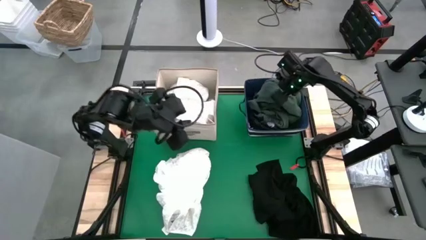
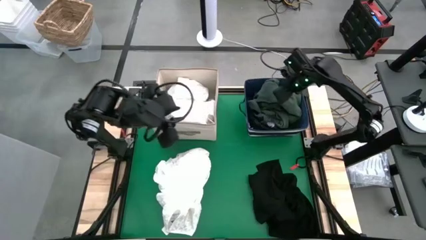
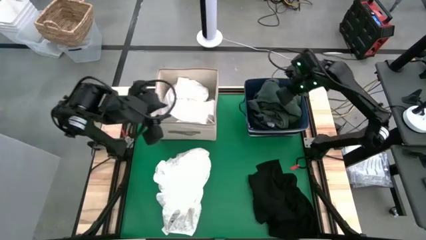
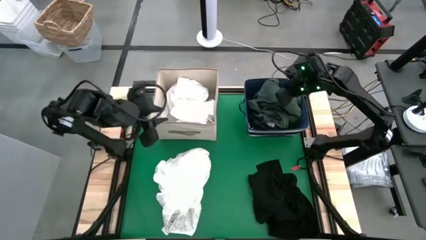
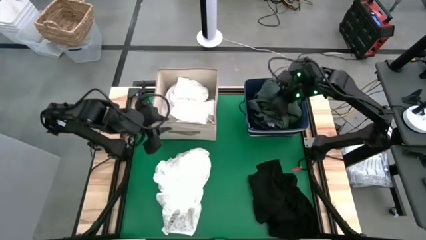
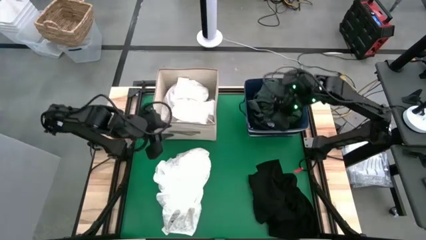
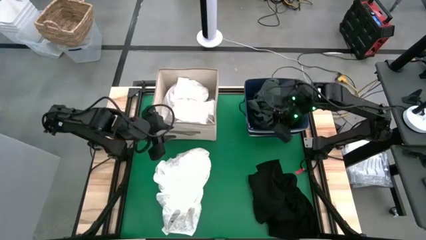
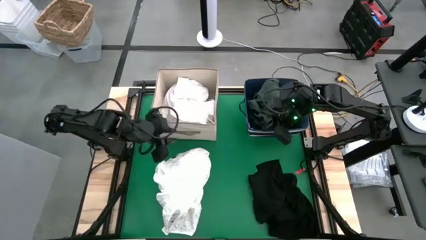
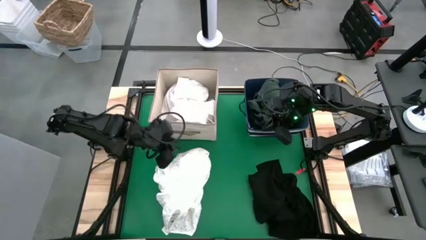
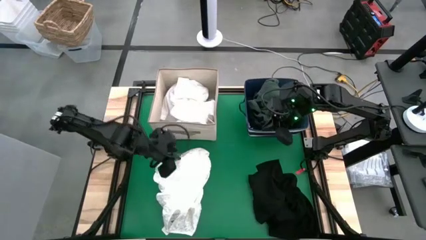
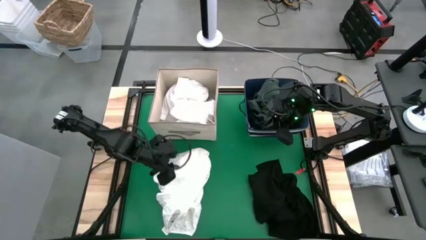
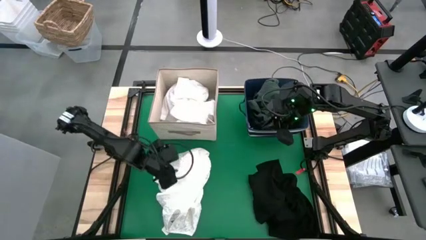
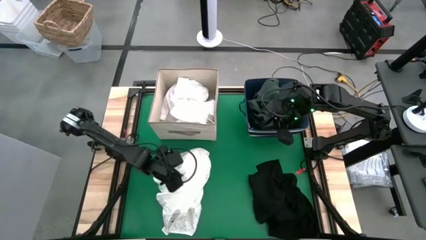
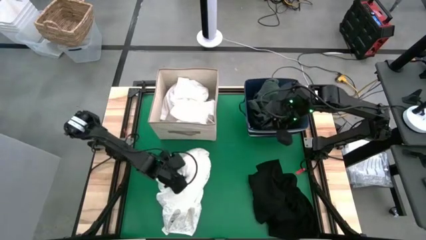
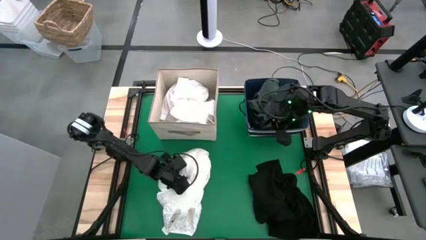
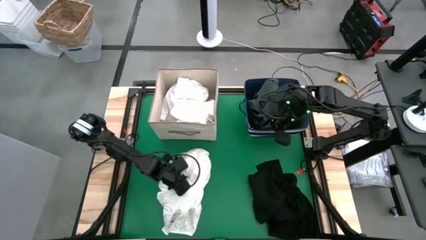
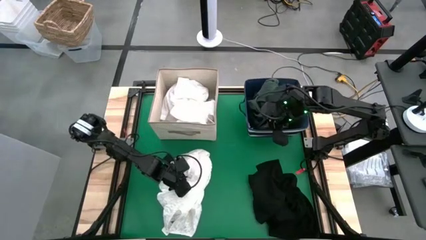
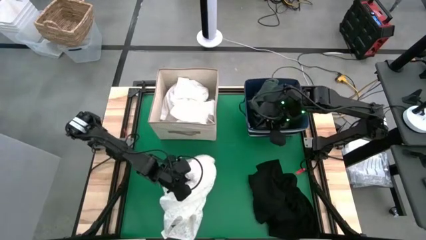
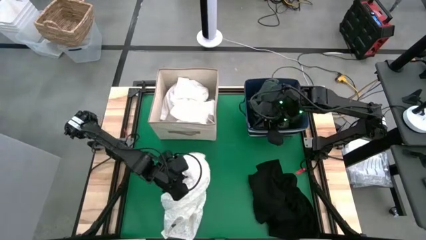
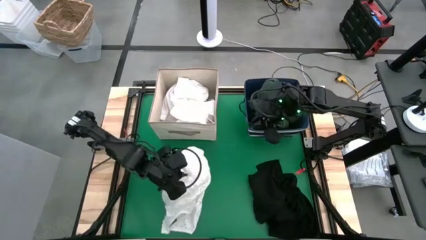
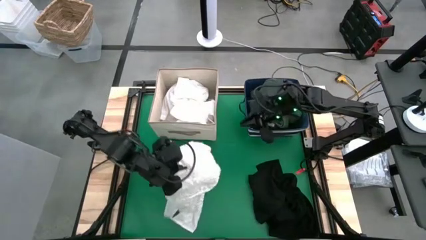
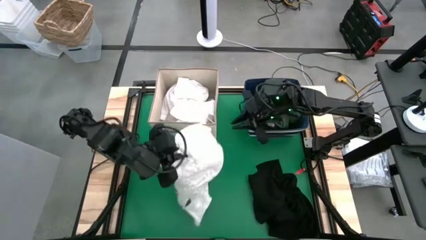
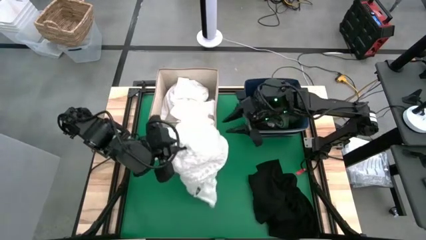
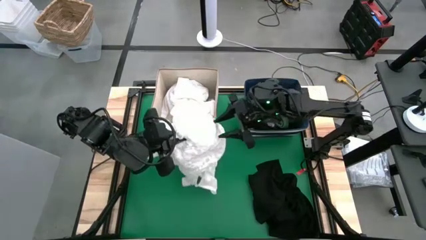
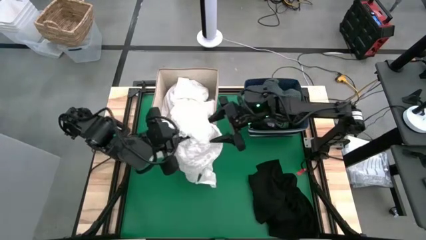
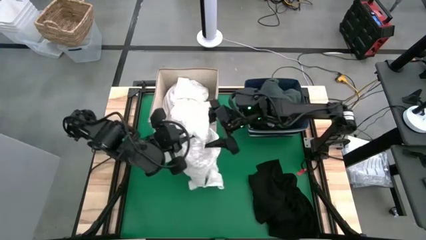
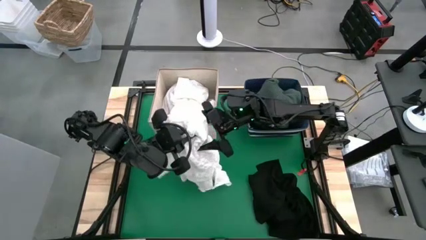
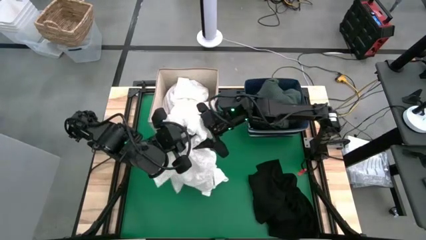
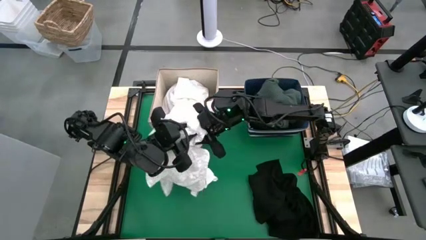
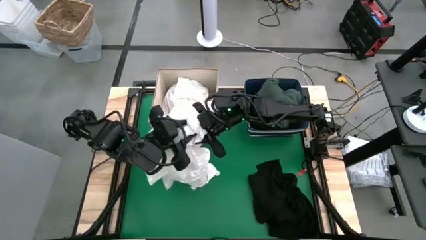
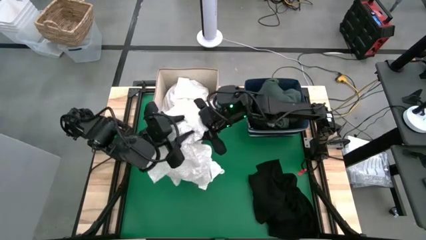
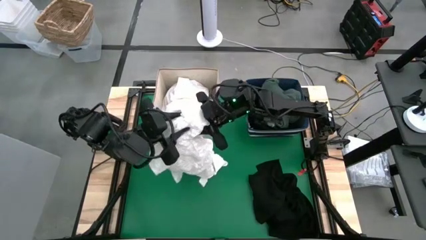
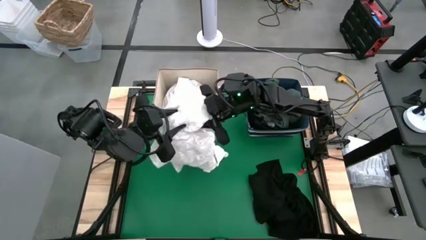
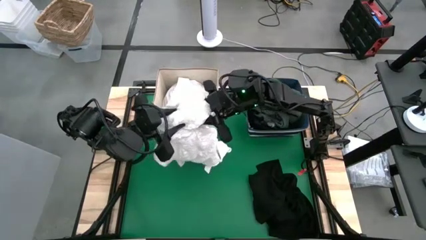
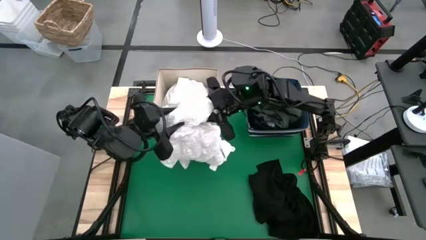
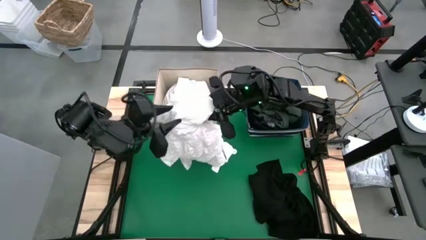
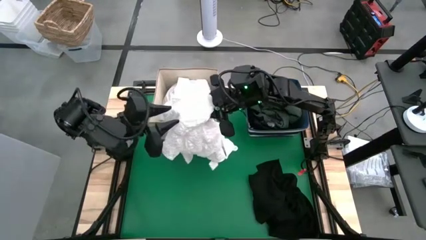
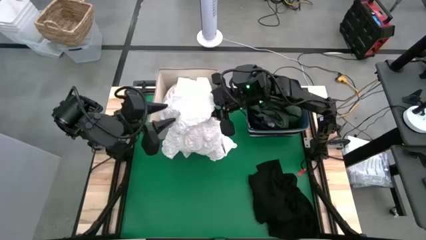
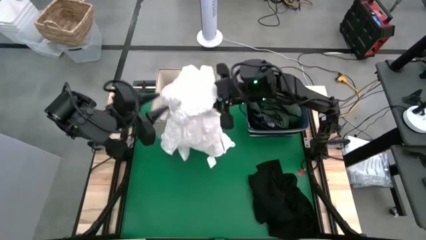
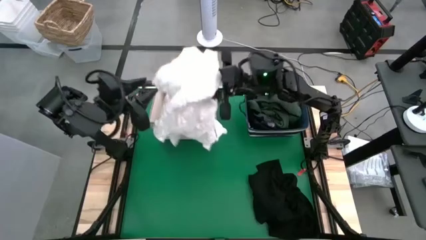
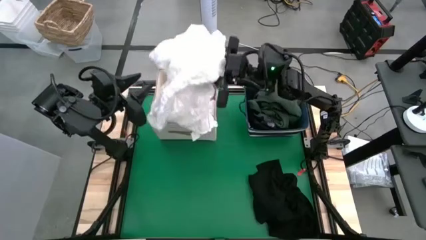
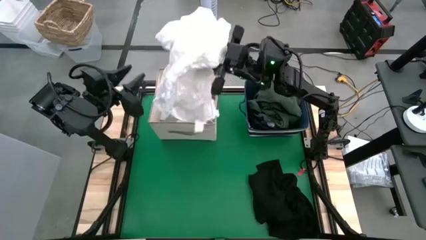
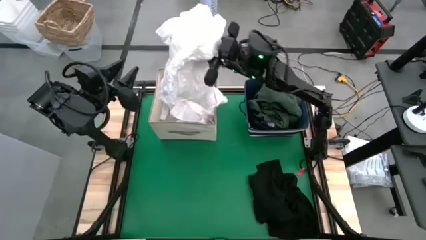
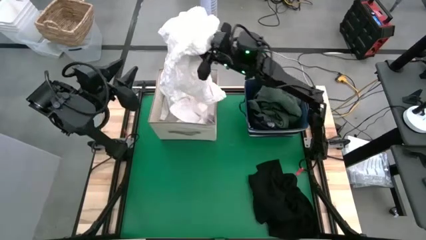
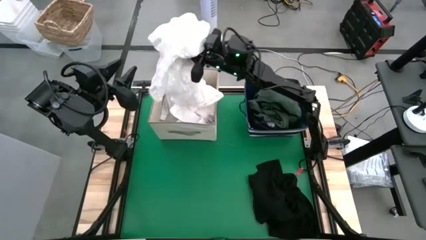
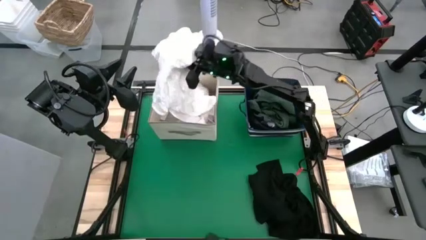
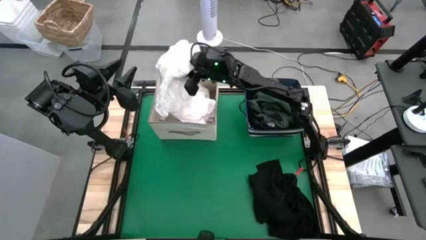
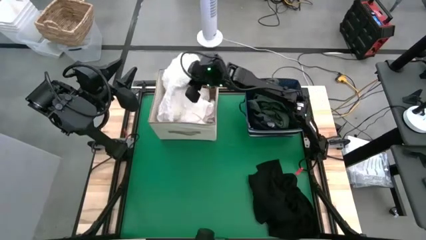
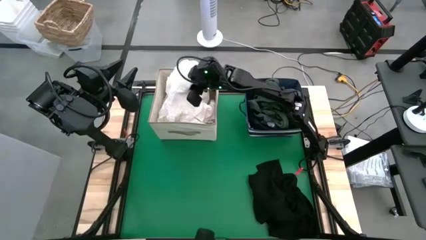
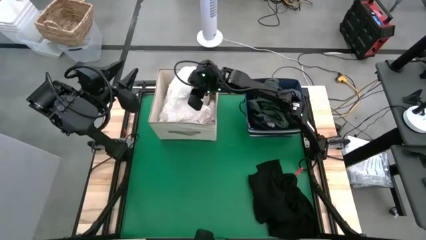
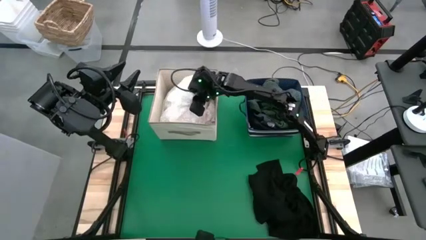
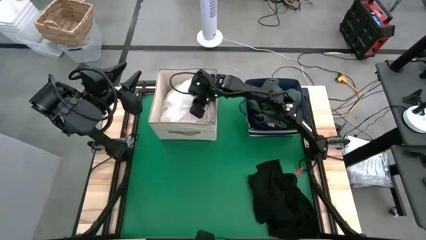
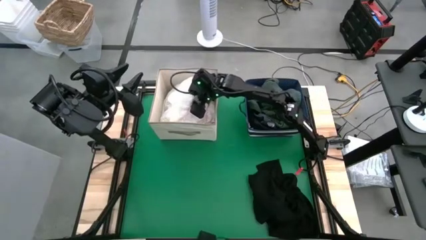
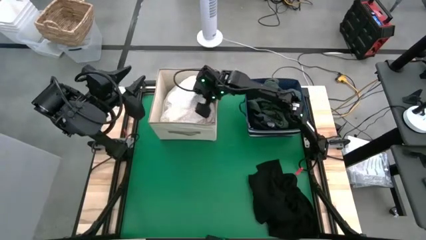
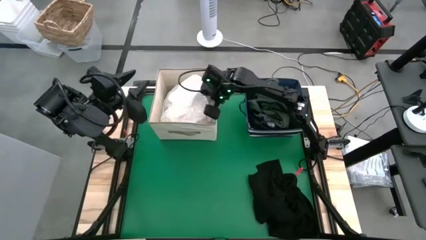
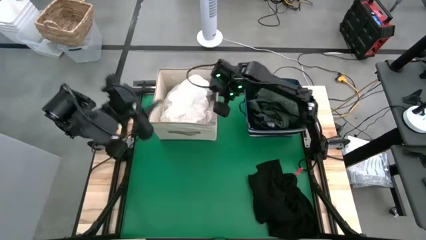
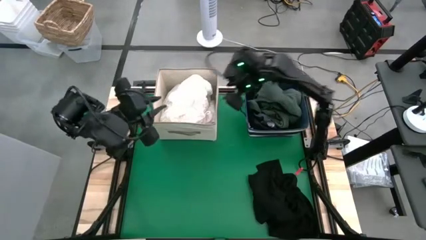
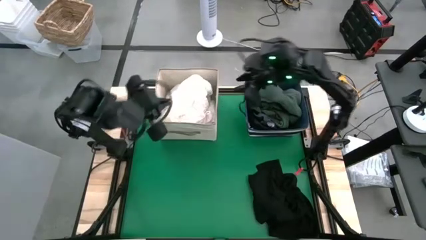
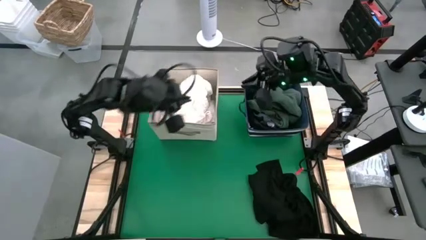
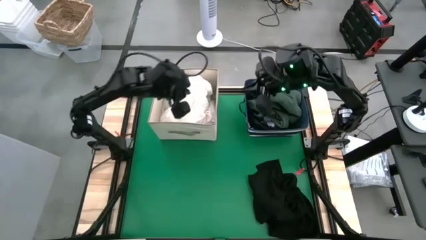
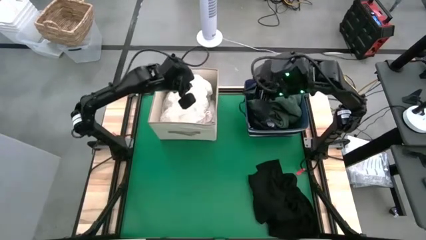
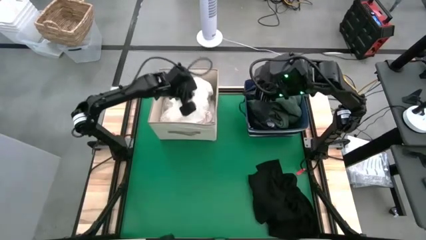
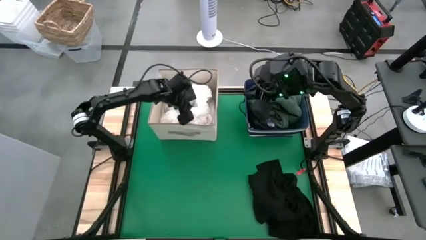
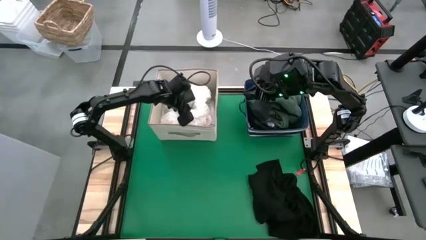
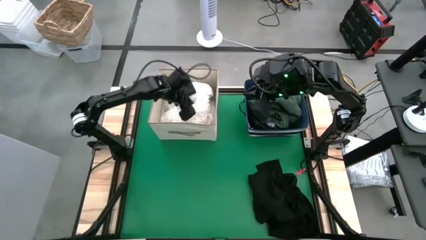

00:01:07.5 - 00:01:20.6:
Put the white shirt into the white laundry bin
